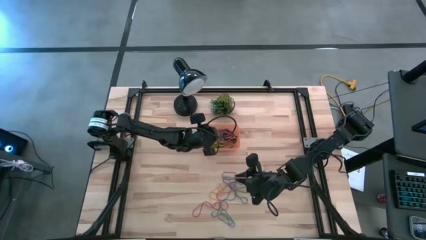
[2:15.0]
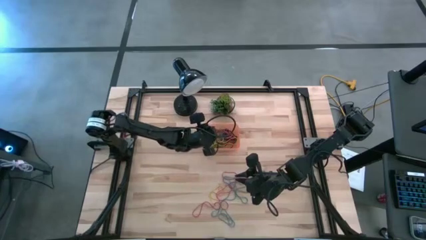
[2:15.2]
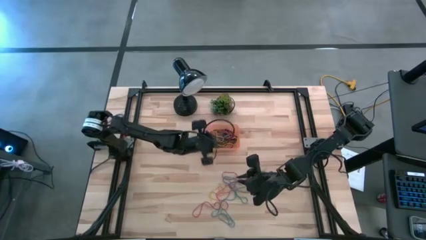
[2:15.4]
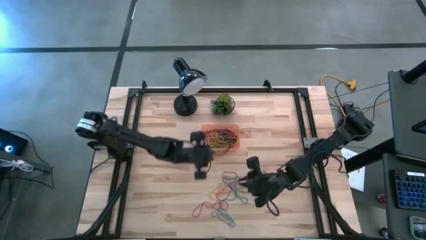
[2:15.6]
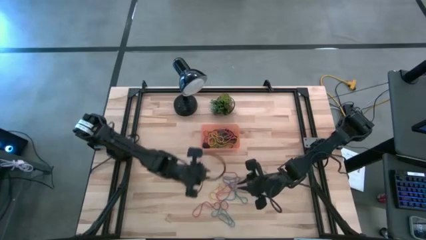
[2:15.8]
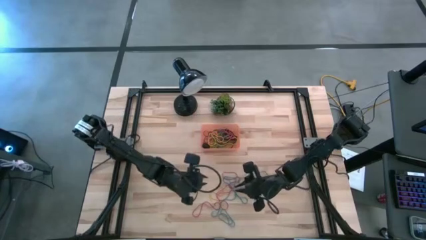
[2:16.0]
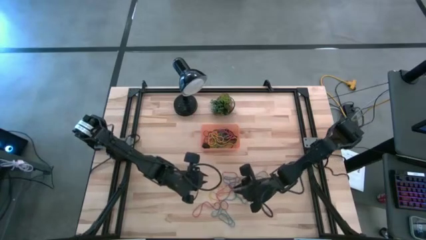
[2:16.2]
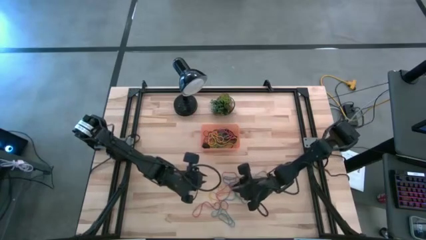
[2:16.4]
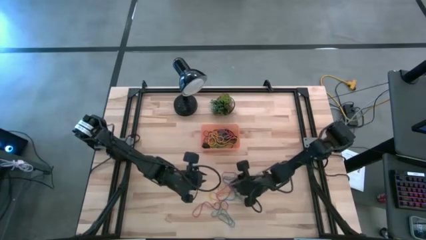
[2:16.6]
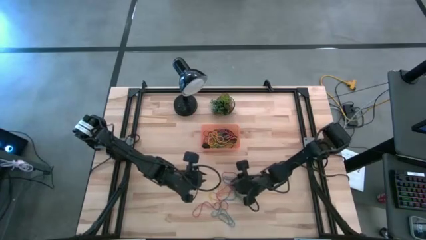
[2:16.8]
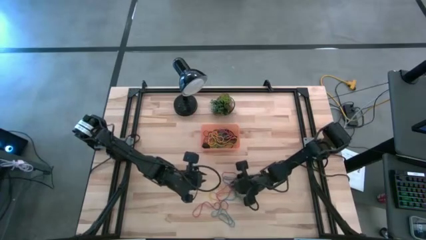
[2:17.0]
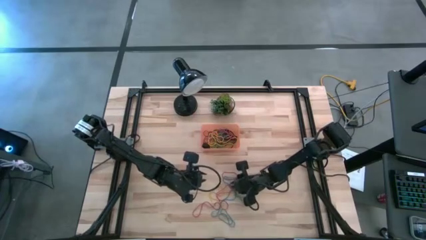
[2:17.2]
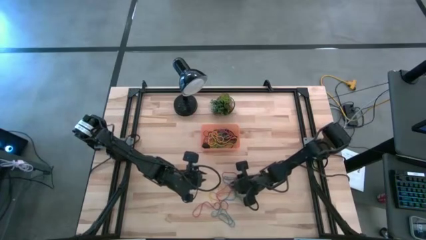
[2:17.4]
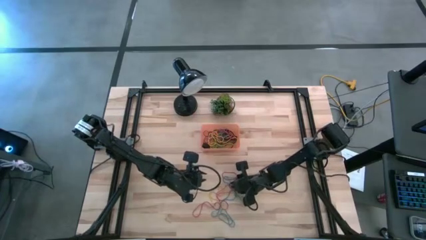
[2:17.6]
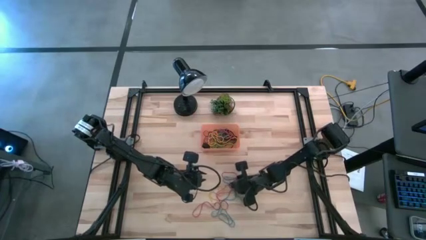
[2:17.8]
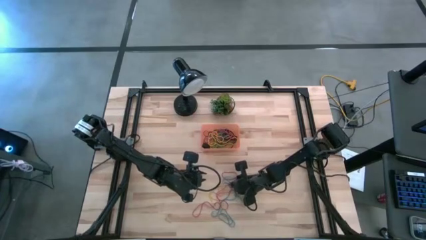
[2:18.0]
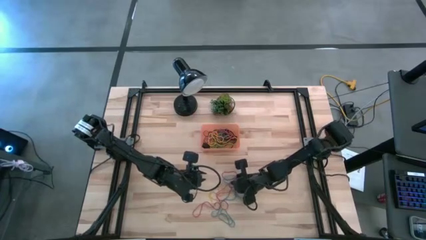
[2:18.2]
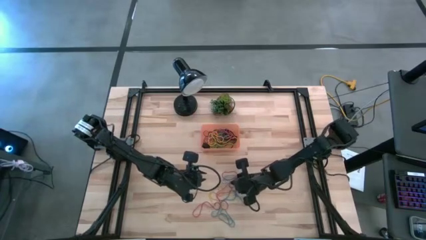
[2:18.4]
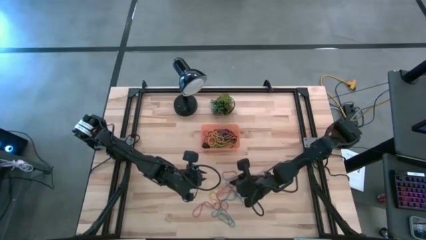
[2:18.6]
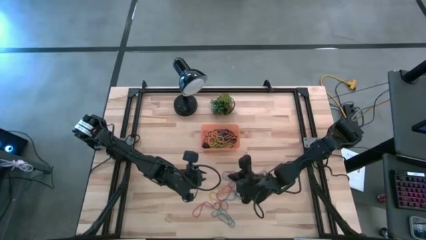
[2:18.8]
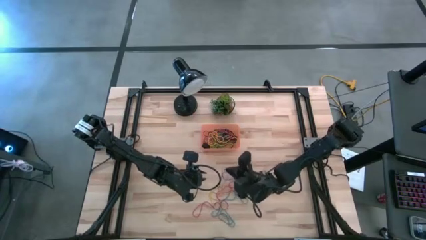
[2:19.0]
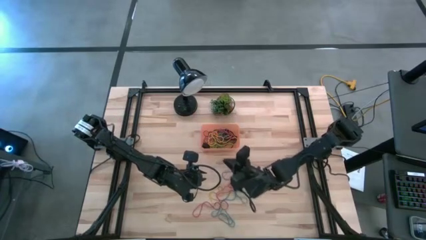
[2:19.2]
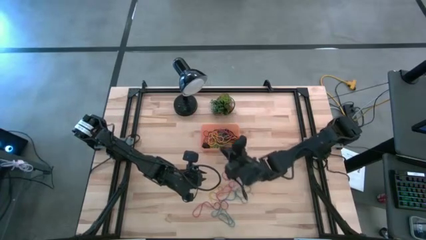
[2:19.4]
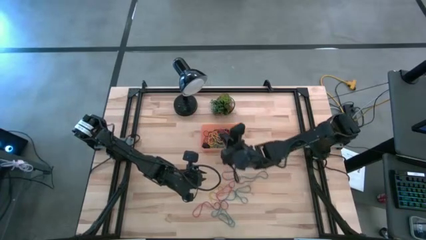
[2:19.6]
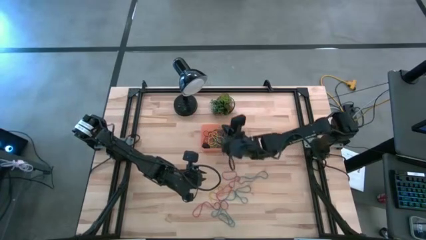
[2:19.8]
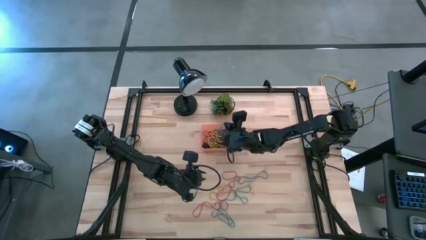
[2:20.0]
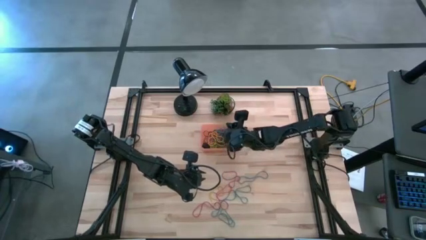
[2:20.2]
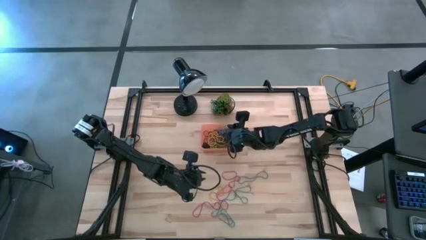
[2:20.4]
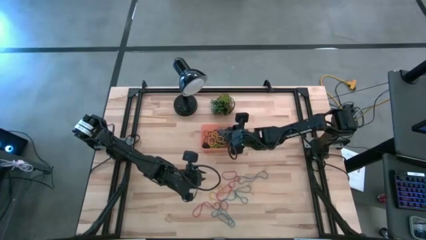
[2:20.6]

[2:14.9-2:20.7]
Task: Pick and place rubber bands into bin
Put the blue rubber band into the orange bin

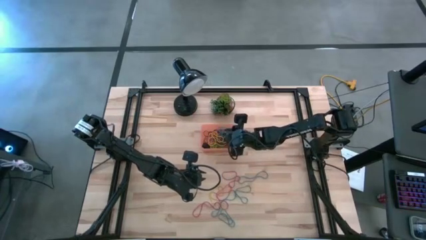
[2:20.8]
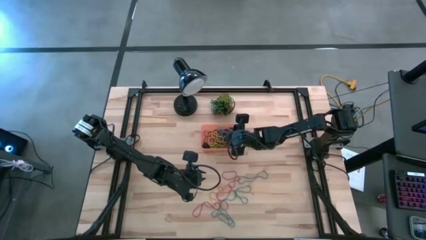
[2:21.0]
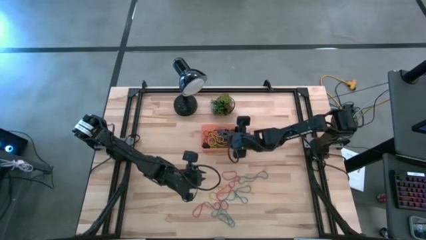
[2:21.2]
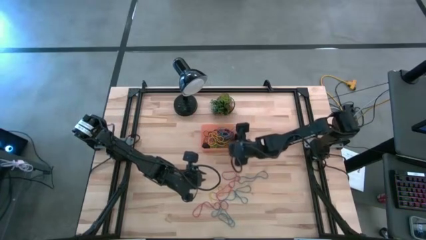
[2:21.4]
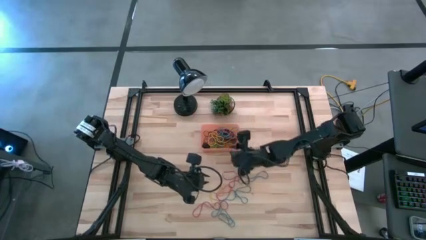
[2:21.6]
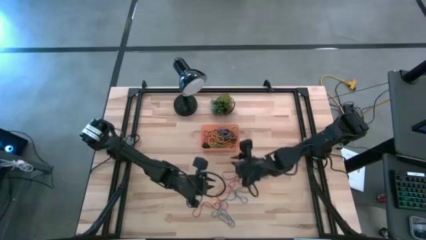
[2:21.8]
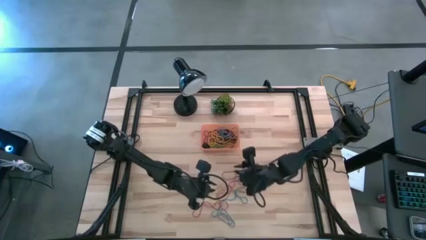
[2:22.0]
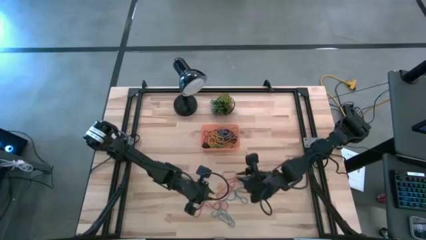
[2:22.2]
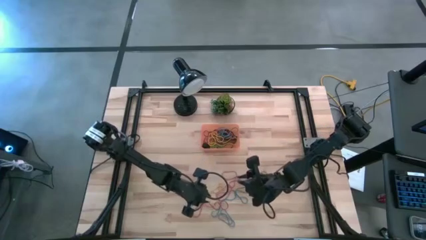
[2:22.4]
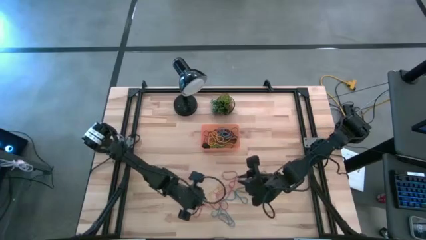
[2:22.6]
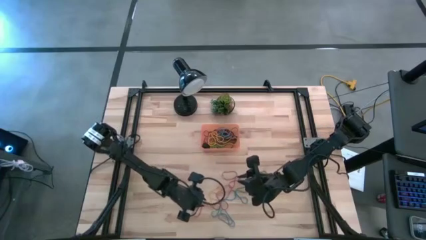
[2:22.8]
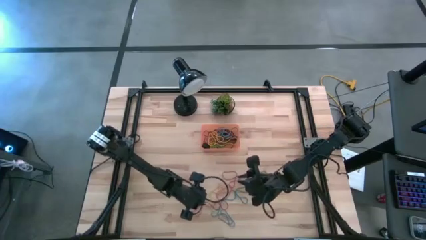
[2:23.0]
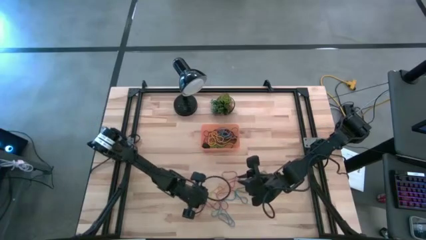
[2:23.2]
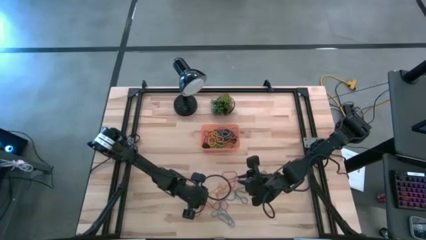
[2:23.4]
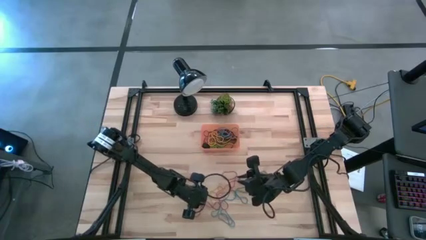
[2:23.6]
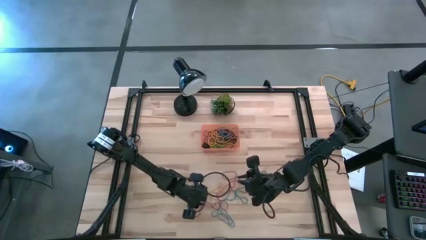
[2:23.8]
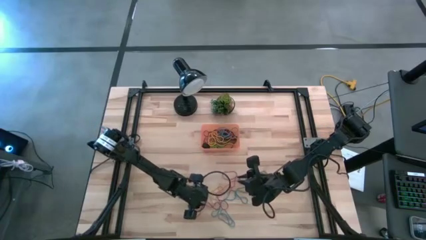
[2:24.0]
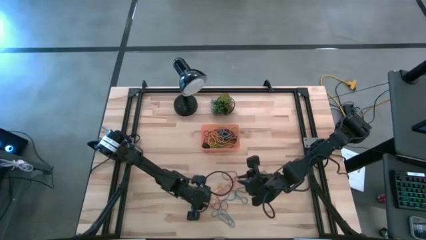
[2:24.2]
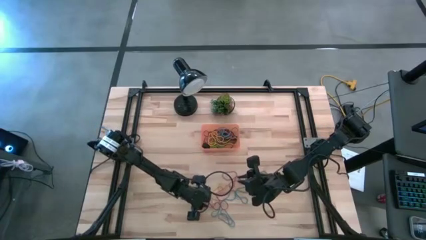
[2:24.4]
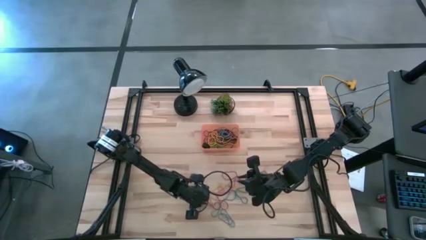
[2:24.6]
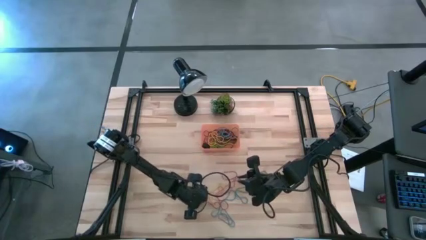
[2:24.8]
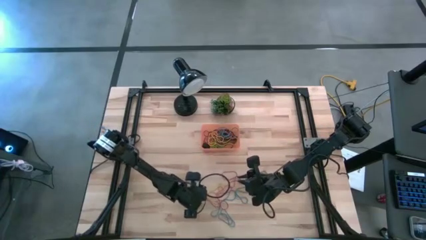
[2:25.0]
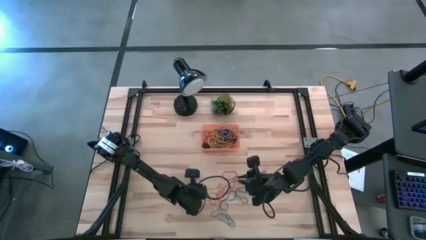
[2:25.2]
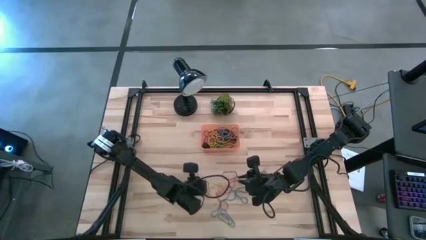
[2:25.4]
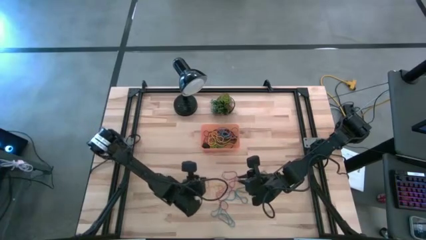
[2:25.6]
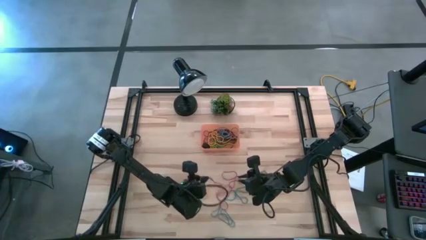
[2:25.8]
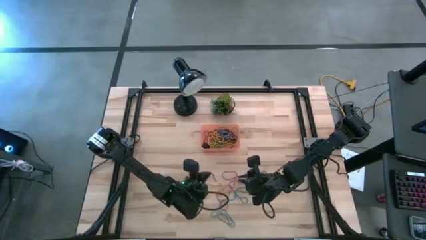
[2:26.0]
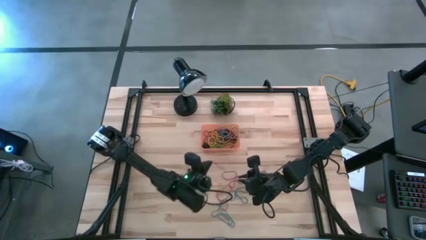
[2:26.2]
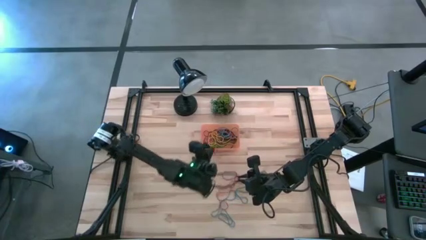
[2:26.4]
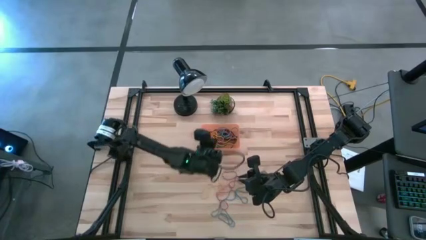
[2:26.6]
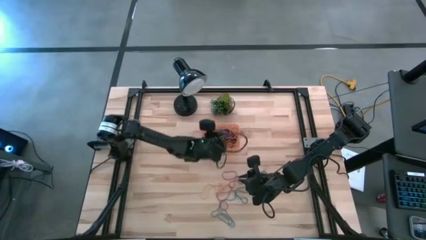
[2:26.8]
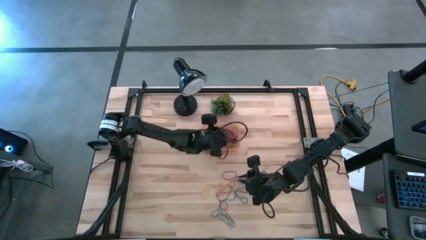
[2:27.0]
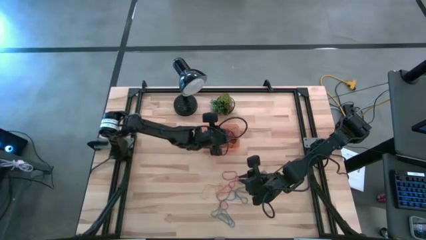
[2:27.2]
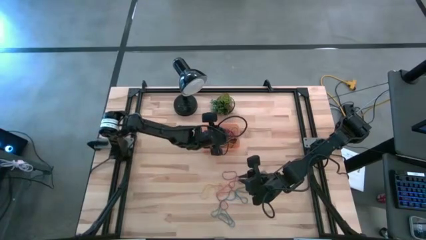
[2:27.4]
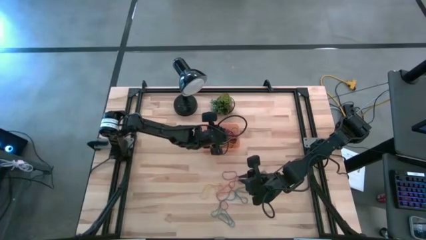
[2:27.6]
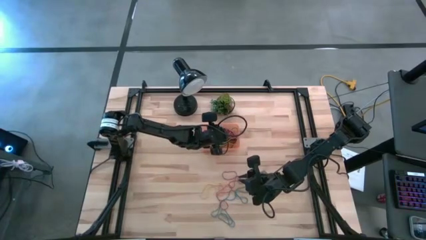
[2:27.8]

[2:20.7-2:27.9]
Put the red rubber band into the orange bin

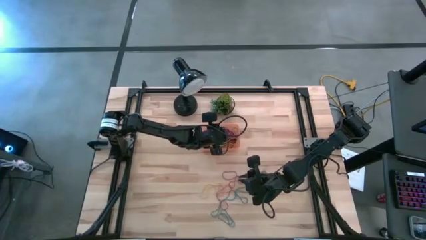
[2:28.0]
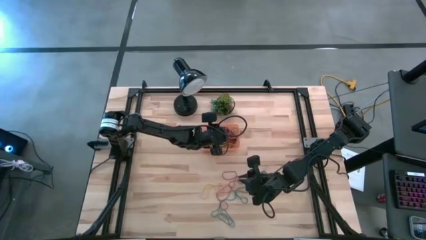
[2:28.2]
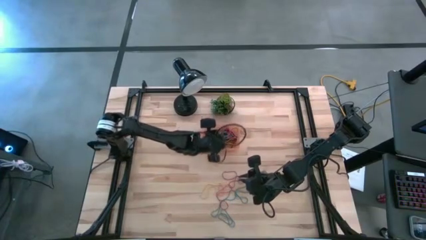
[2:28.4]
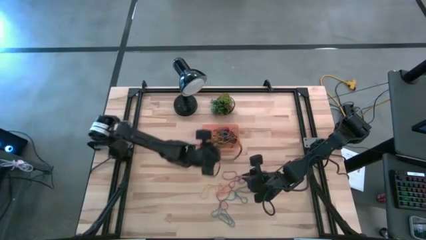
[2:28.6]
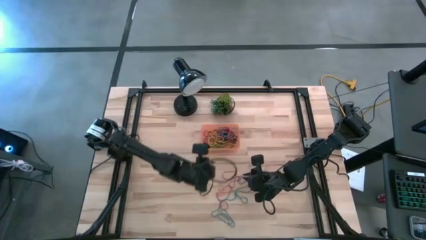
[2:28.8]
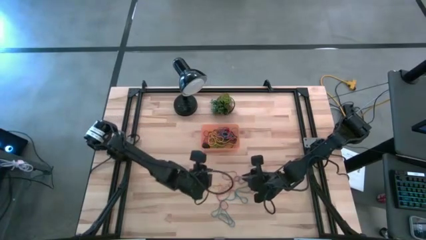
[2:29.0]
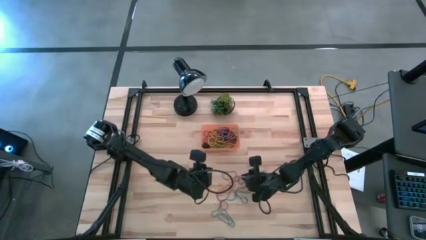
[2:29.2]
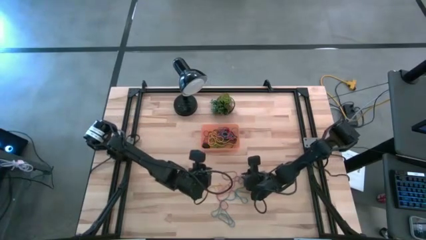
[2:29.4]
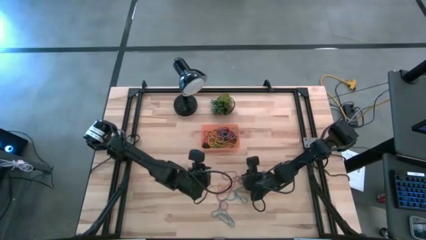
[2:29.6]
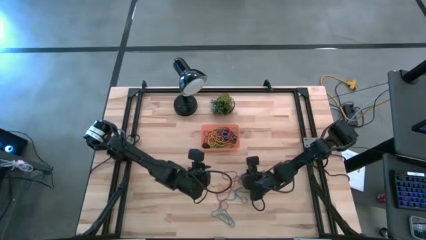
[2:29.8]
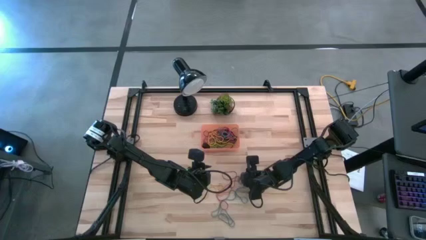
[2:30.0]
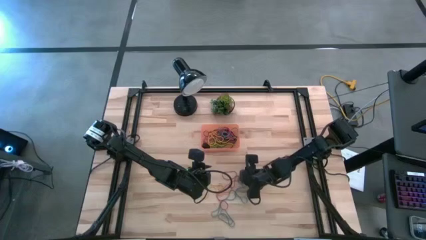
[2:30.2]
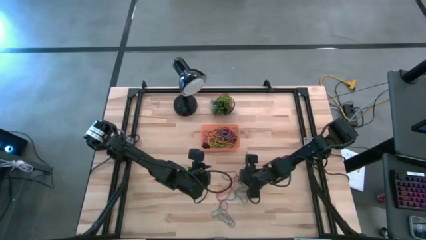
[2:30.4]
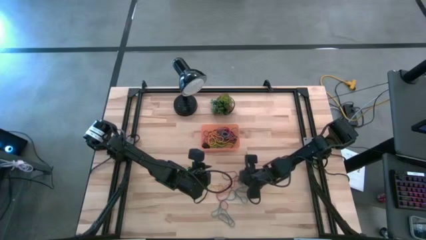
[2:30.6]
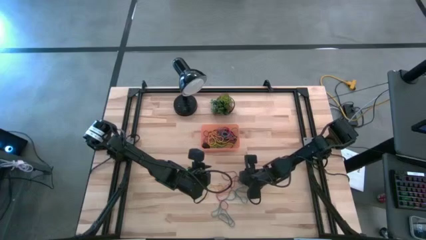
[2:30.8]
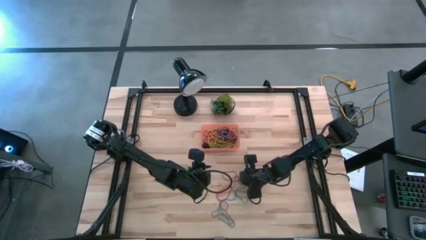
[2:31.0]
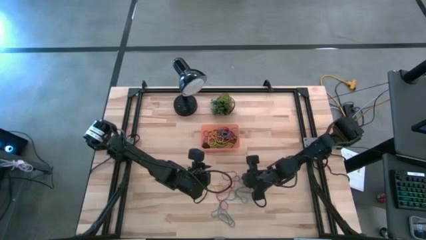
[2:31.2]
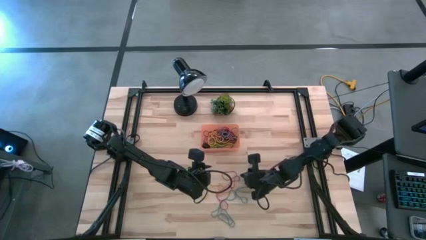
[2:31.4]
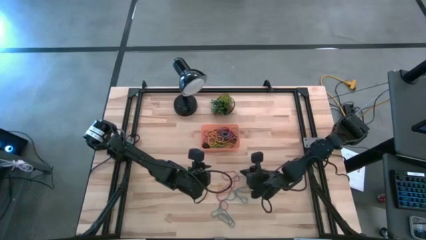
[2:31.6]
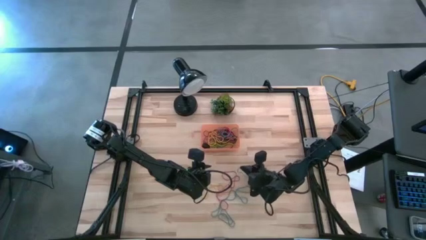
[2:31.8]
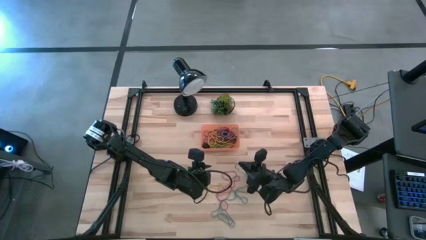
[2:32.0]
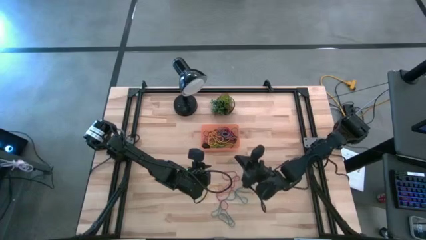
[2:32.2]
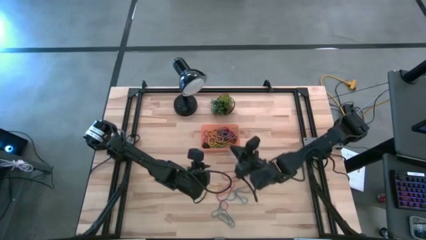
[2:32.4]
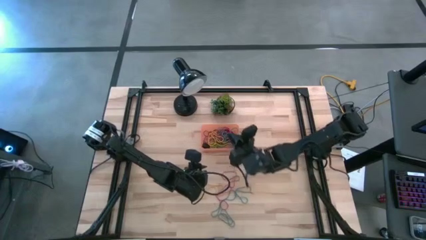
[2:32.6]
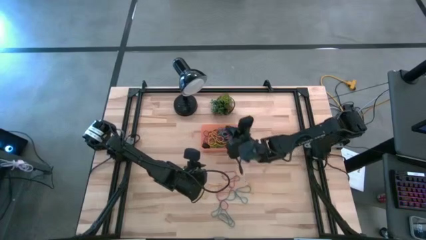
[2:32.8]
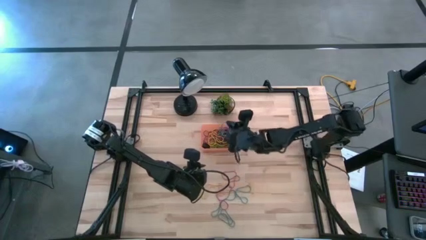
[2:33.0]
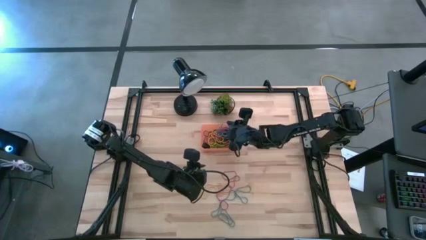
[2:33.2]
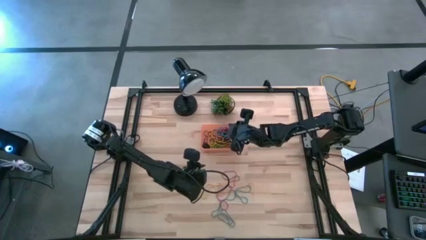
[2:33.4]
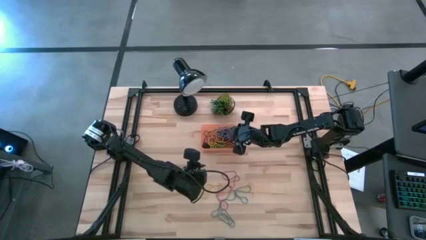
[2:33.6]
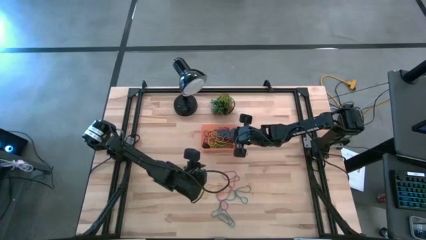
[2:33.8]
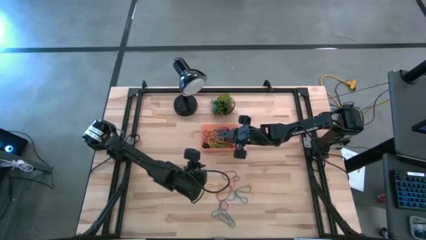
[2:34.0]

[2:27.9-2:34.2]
Put the blue rubber band into the orange bin
